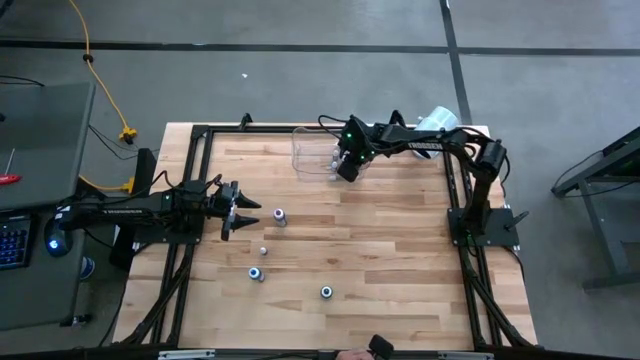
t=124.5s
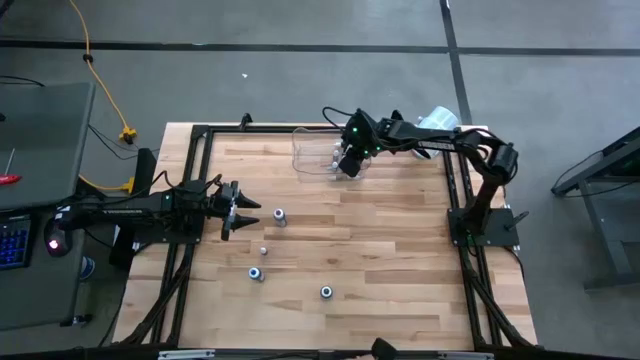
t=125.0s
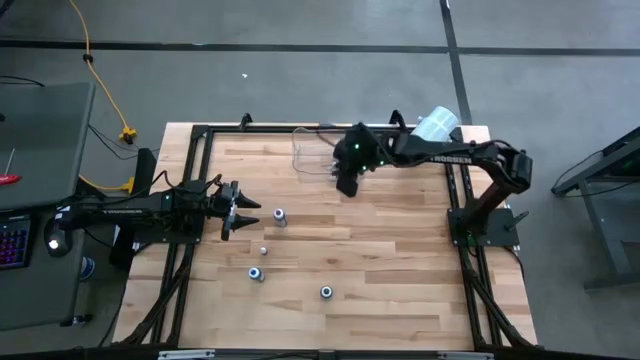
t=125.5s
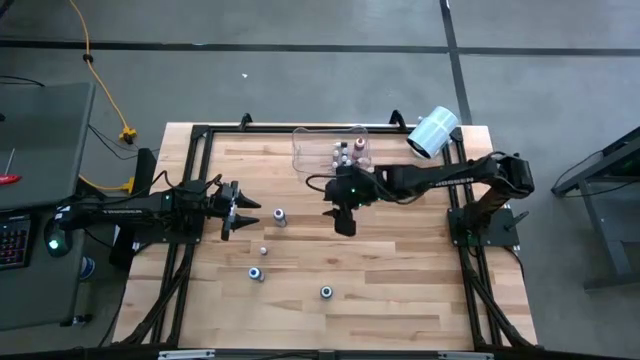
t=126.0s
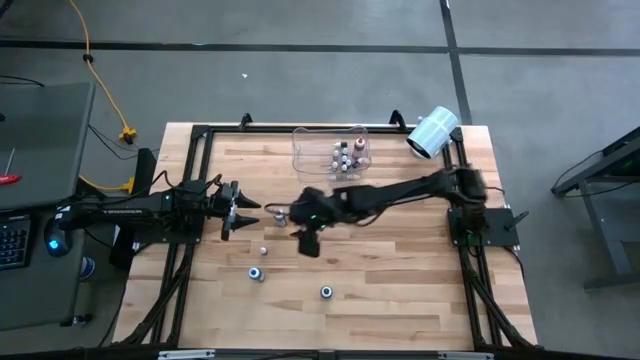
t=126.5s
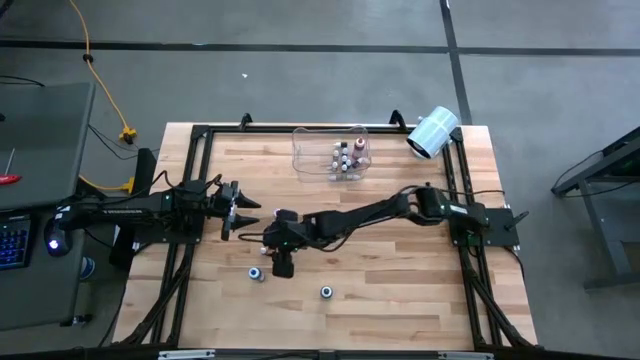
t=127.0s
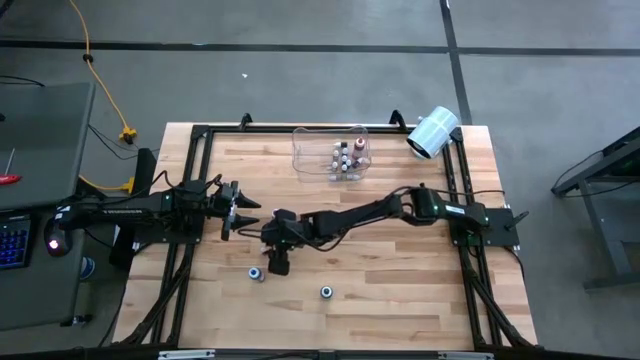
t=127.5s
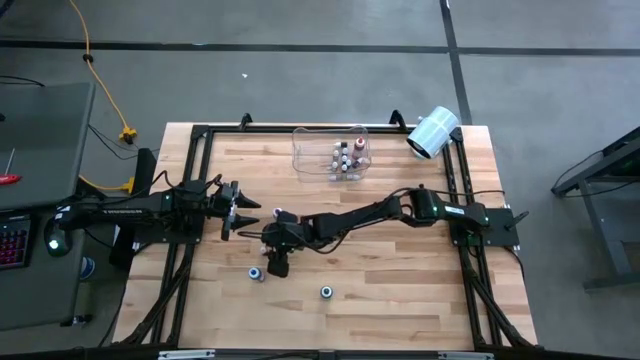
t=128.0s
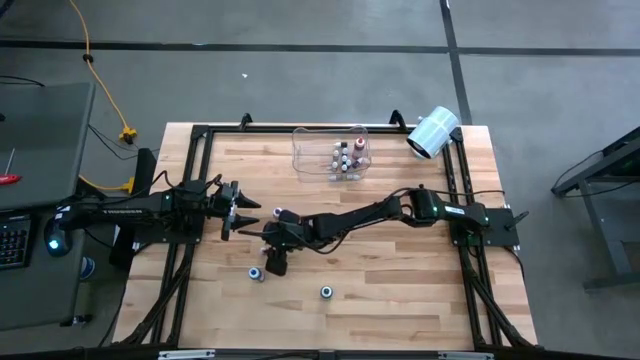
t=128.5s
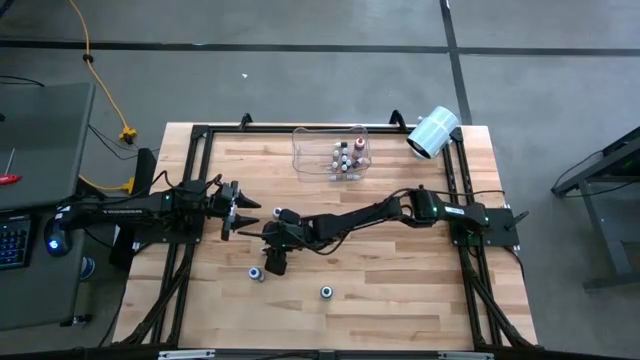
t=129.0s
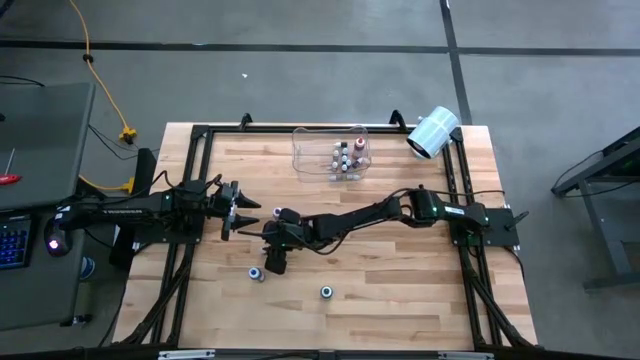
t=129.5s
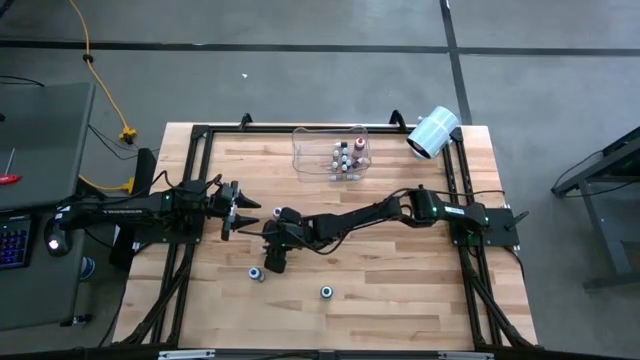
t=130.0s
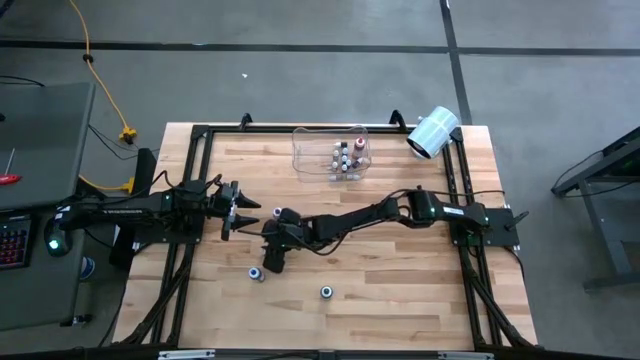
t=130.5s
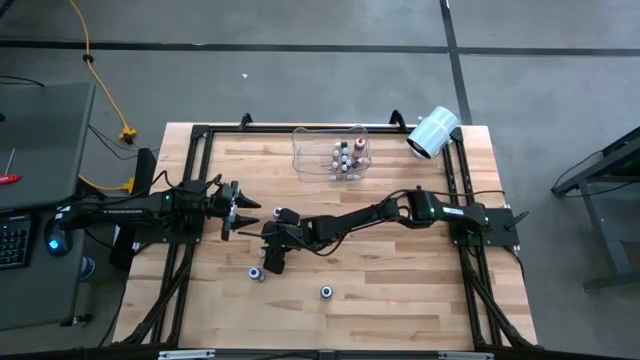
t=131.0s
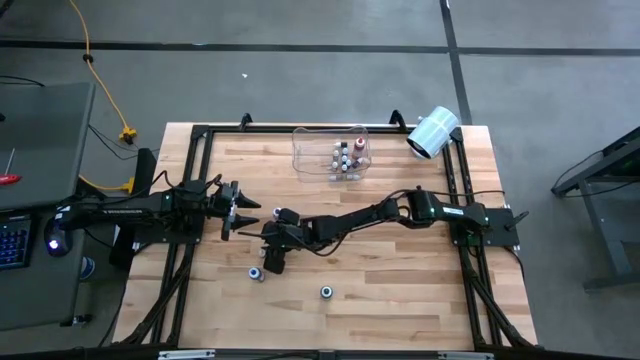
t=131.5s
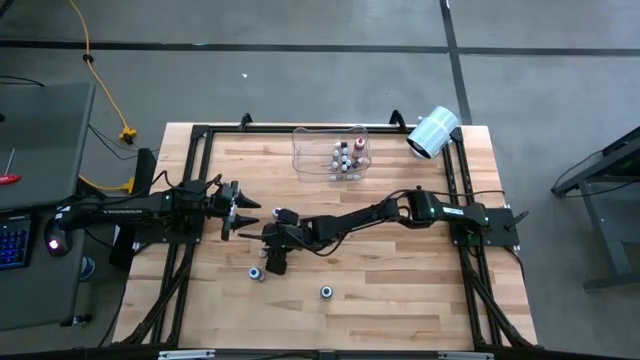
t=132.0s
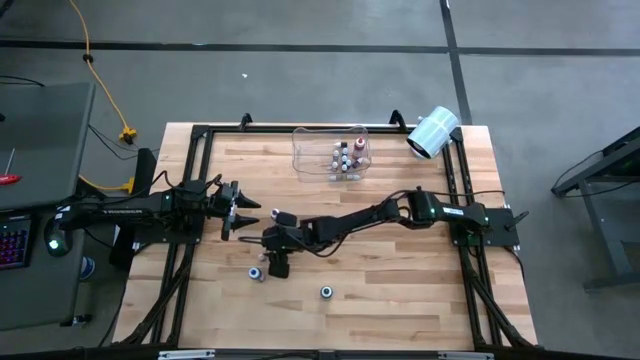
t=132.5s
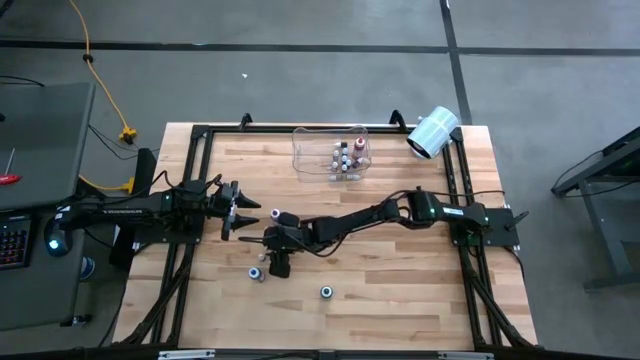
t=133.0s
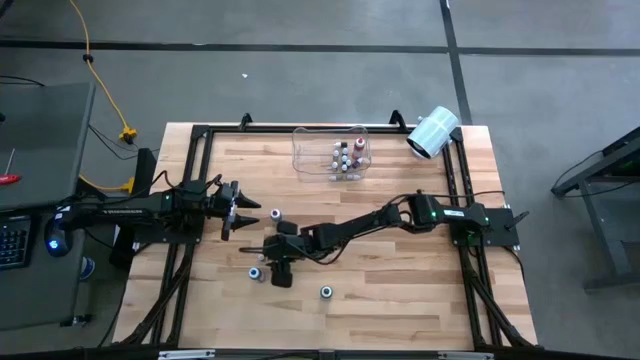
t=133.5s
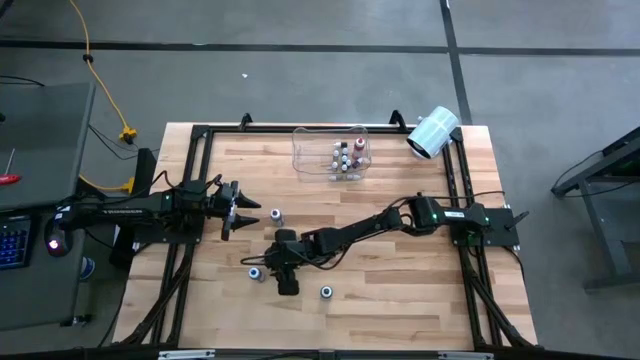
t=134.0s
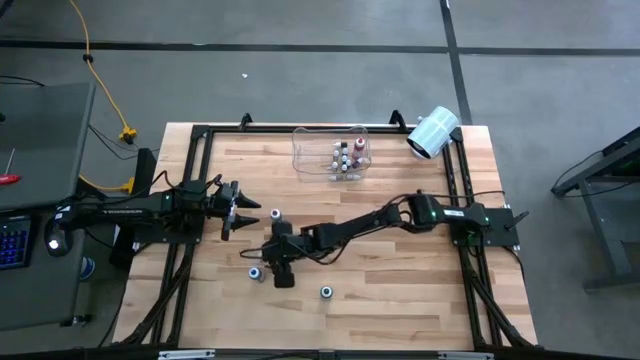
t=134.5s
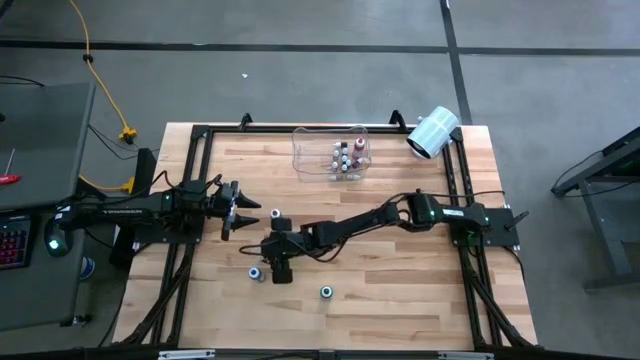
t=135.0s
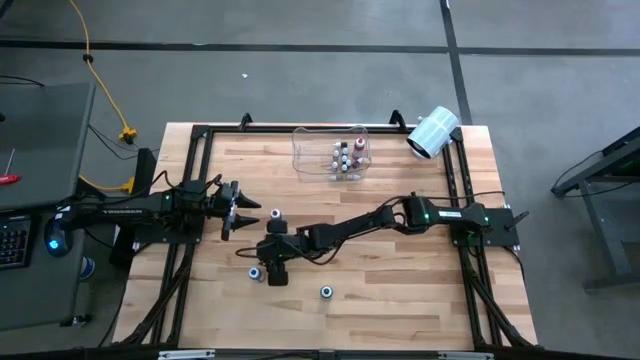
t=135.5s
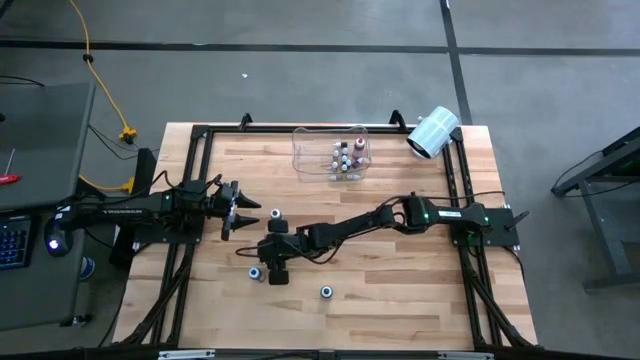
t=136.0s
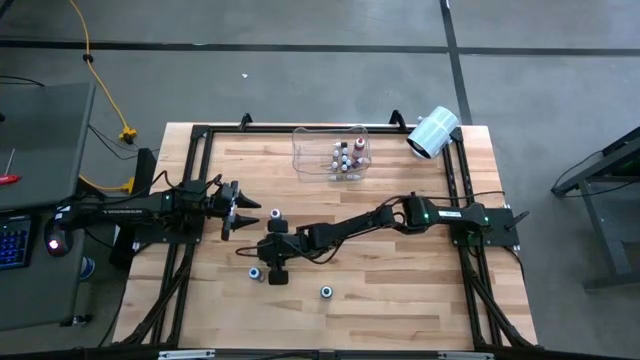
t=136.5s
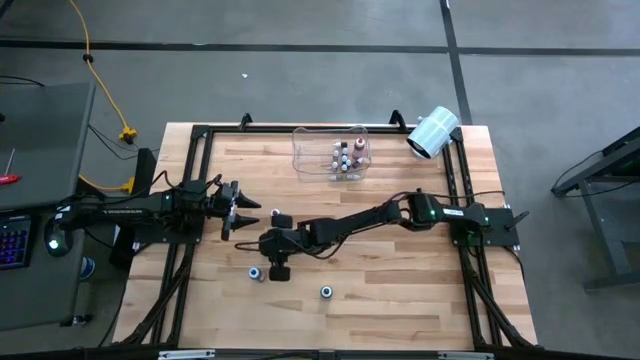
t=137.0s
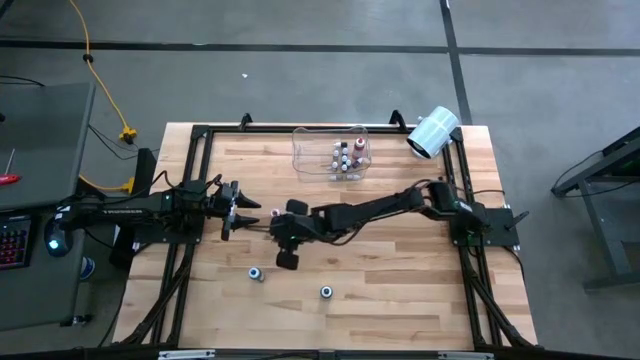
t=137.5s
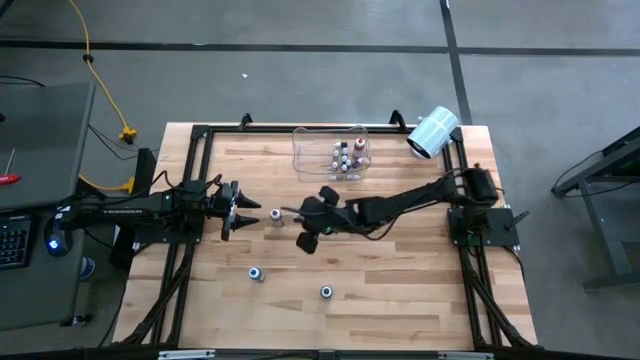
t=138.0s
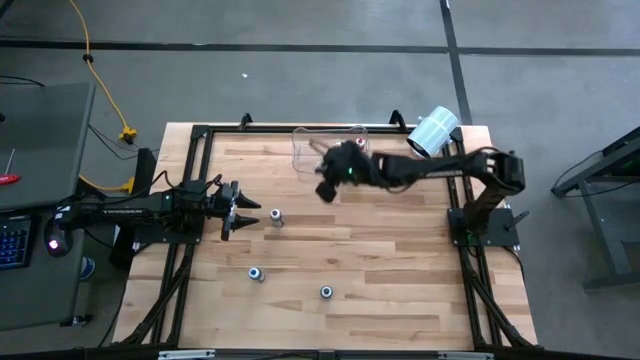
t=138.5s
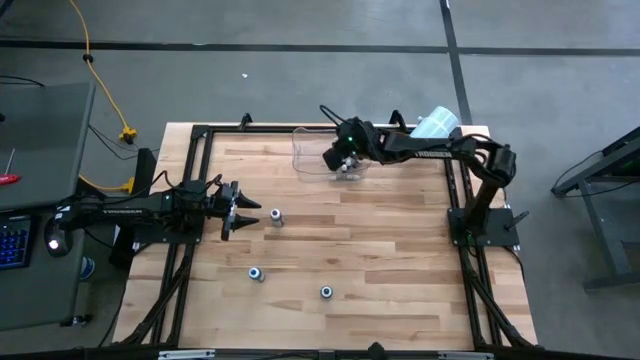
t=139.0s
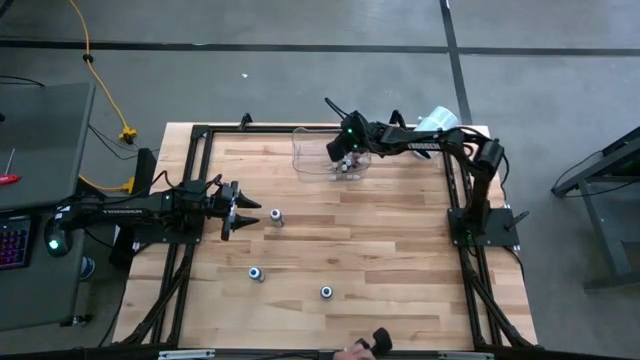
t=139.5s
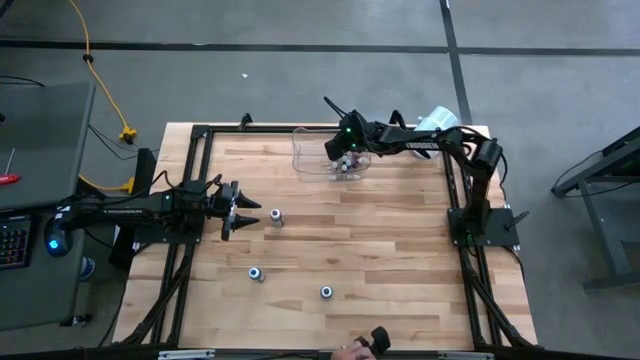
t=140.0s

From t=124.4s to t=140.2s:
Task: Pick & Place food coloring
Put the small orange food coloring into the transparent container

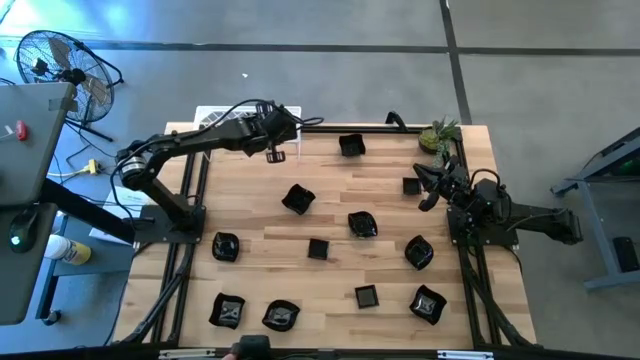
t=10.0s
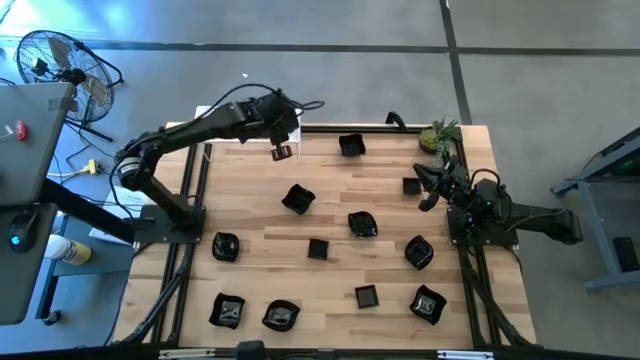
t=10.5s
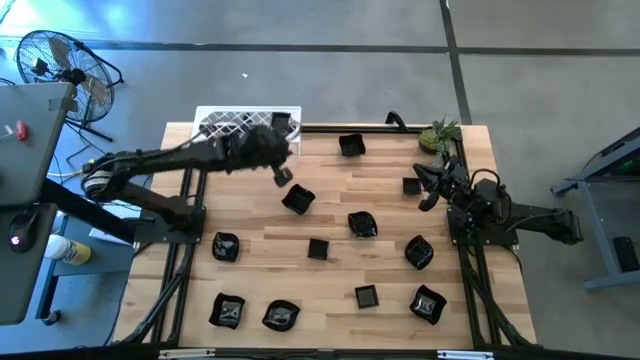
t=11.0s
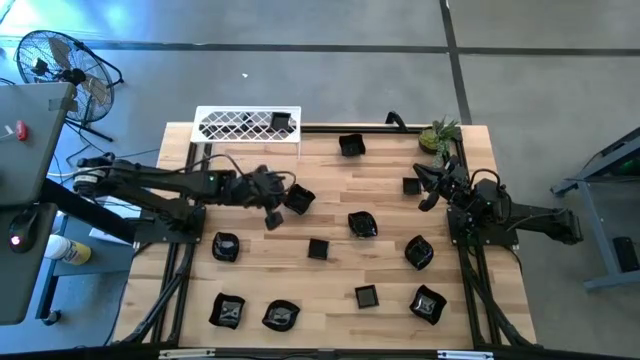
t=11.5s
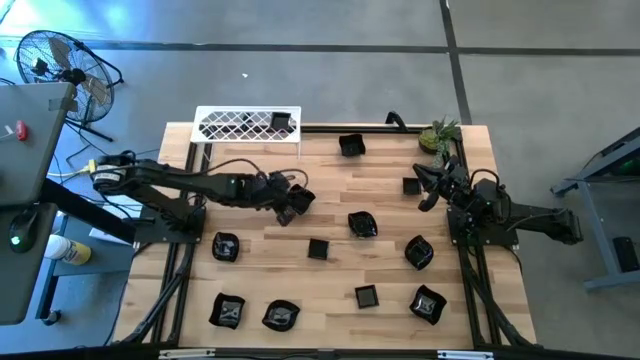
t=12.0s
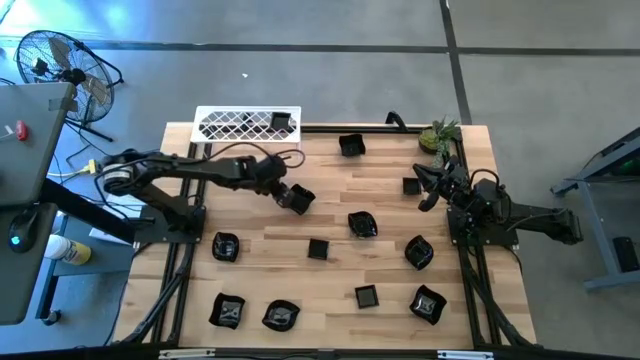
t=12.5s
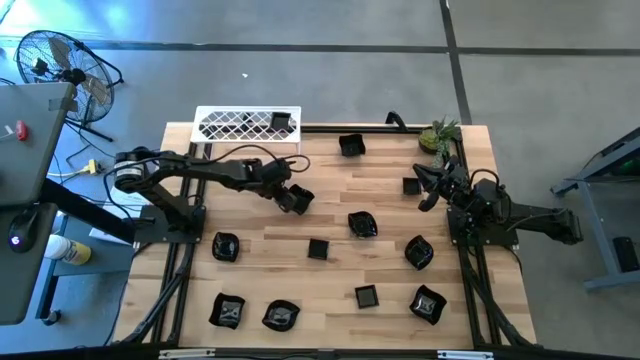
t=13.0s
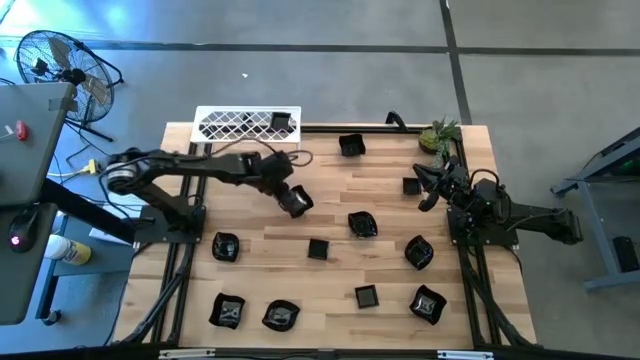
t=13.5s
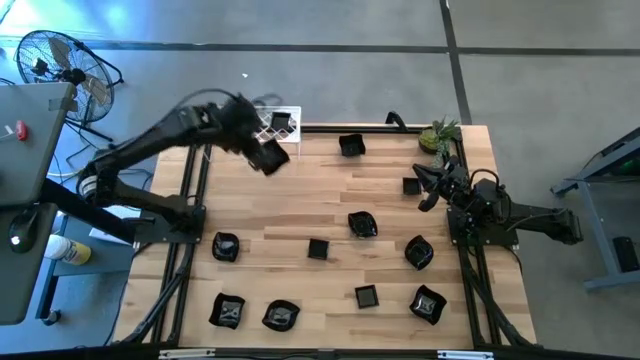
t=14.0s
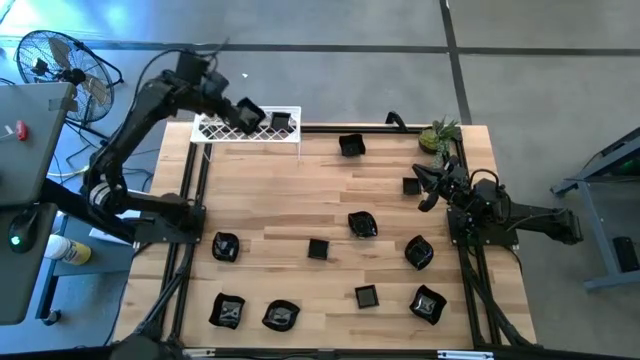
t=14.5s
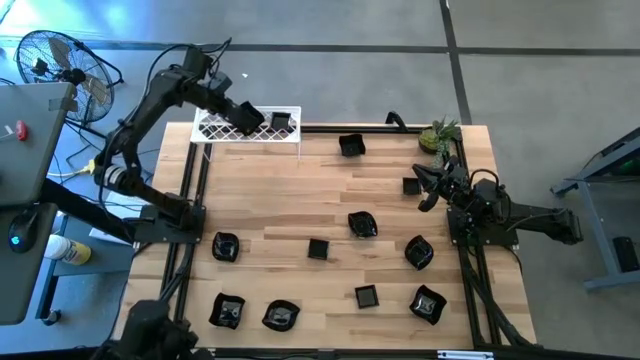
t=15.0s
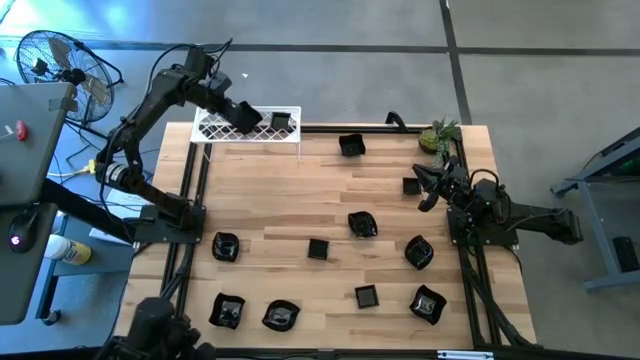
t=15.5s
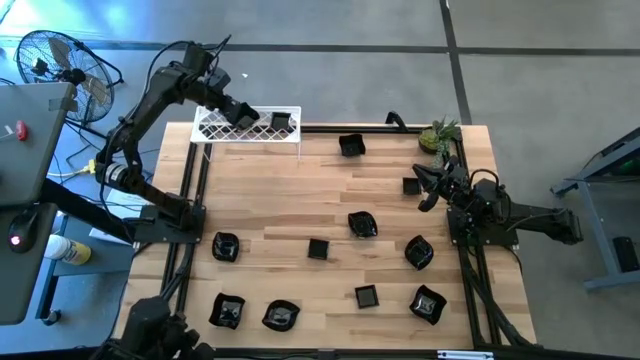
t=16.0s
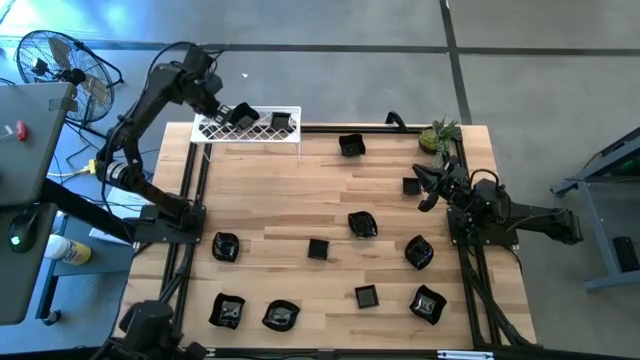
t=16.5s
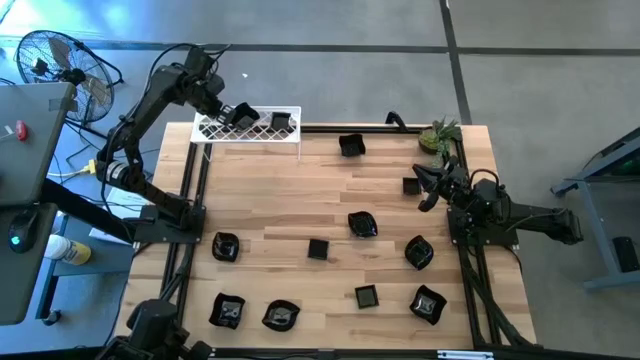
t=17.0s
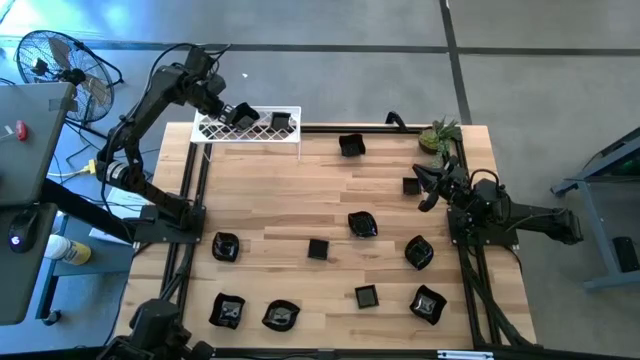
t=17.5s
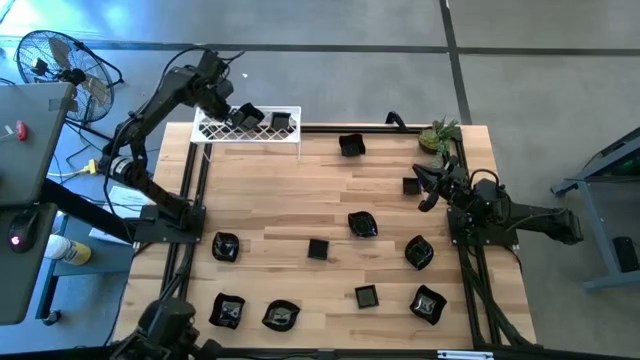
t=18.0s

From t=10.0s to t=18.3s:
Task: Pick & Place Mini shaped plates
Put the black distorted square plate on the shelf
